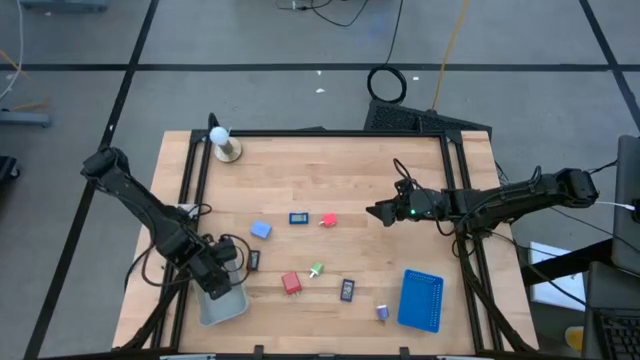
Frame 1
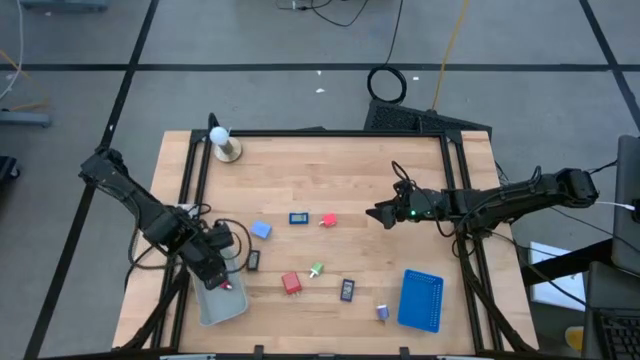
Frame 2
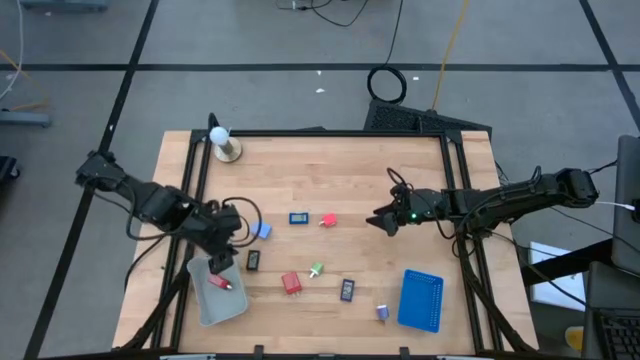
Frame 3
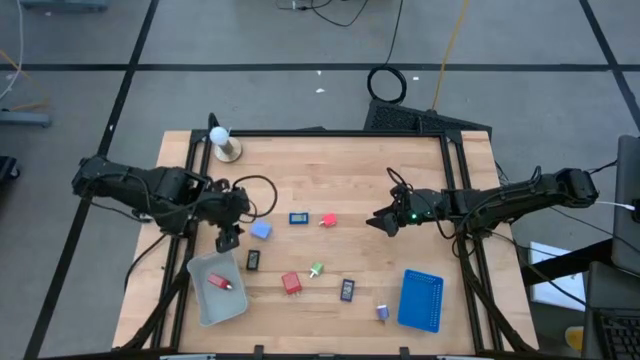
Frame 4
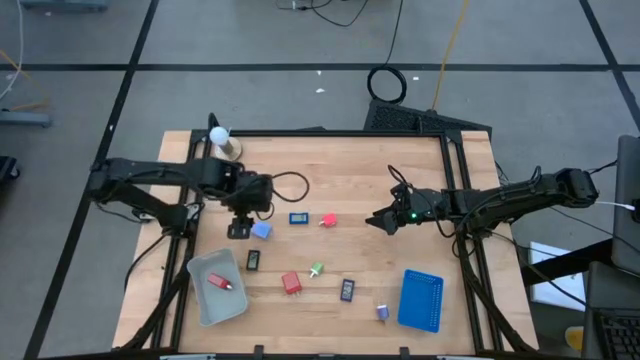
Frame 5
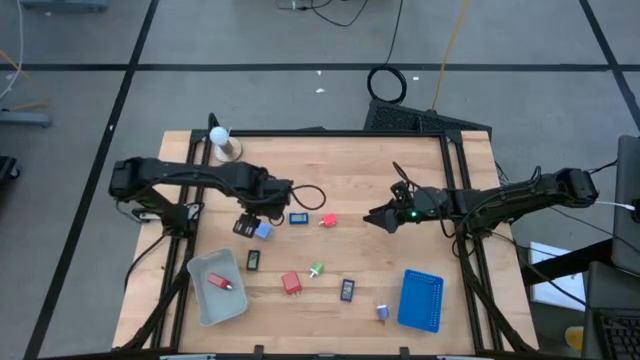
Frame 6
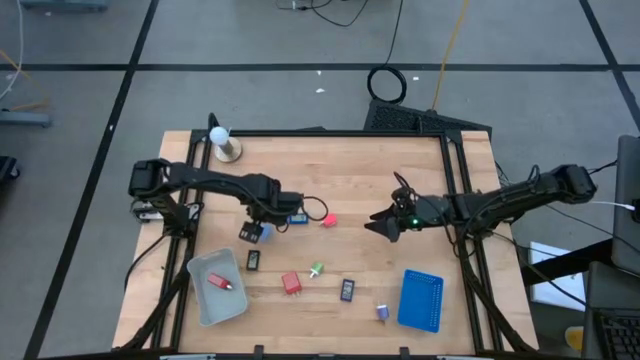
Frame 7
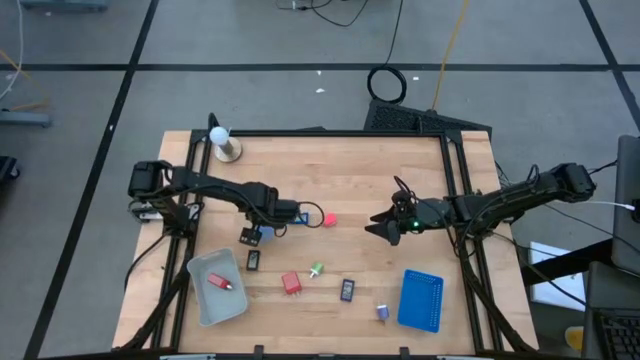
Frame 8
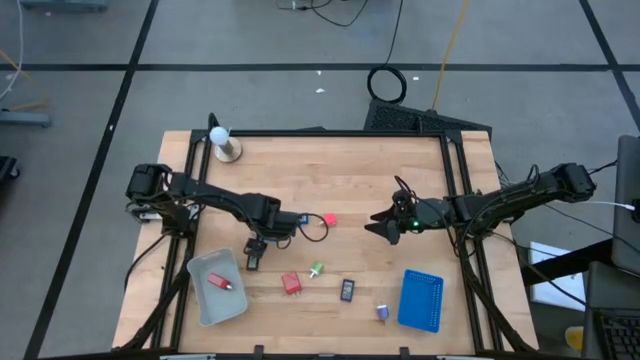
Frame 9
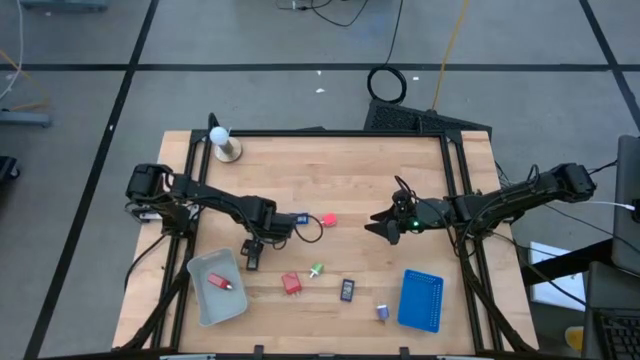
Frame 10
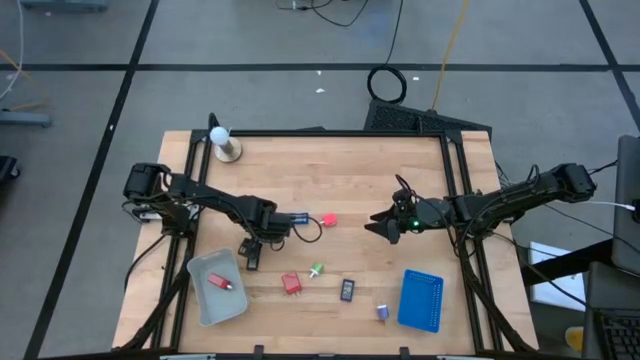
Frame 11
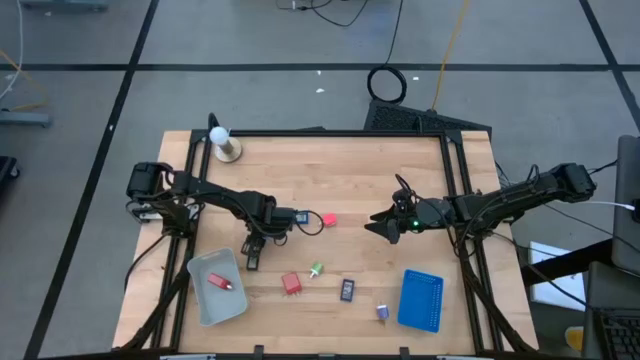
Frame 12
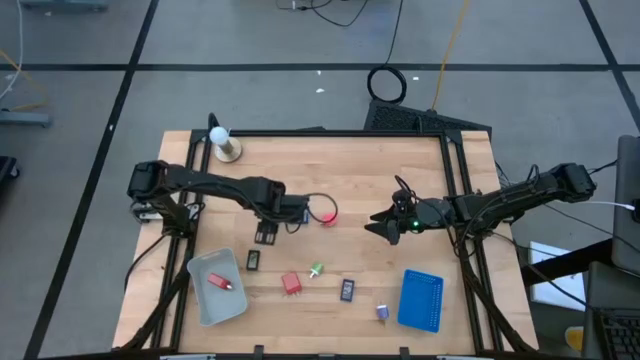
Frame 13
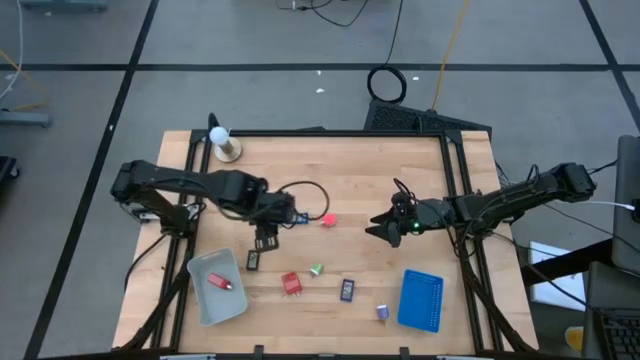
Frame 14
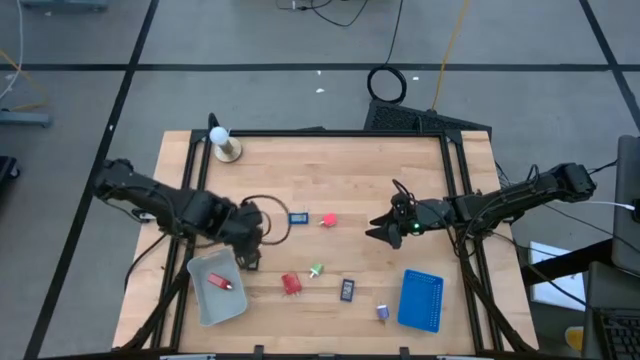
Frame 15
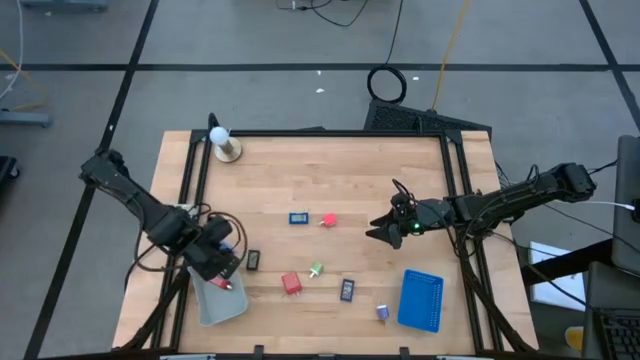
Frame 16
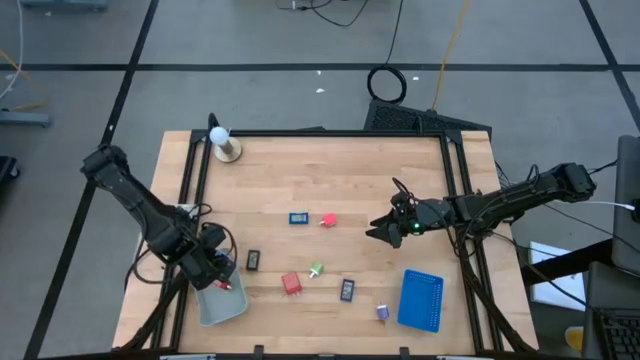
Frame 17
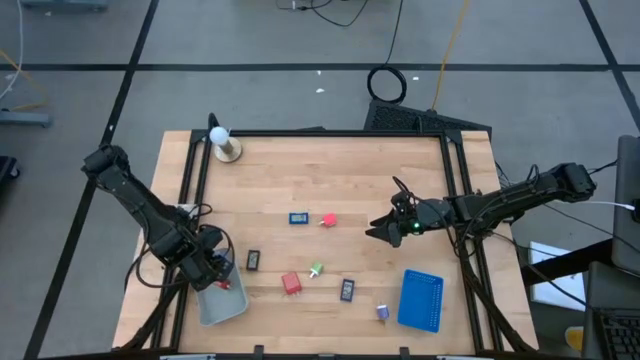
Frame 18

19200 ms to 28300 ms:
Task: Pick & Place Office items
Put the blue power adapter into the gray bin

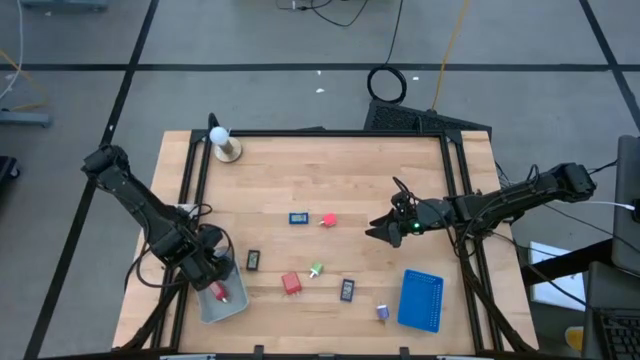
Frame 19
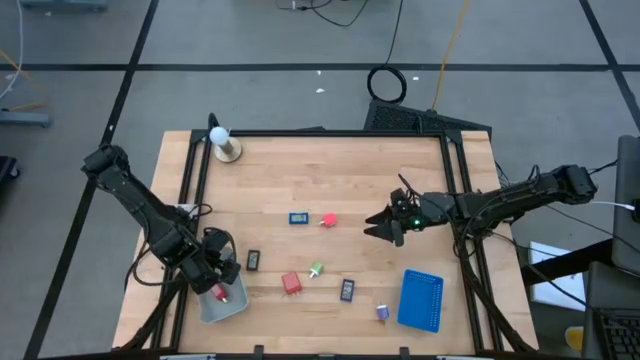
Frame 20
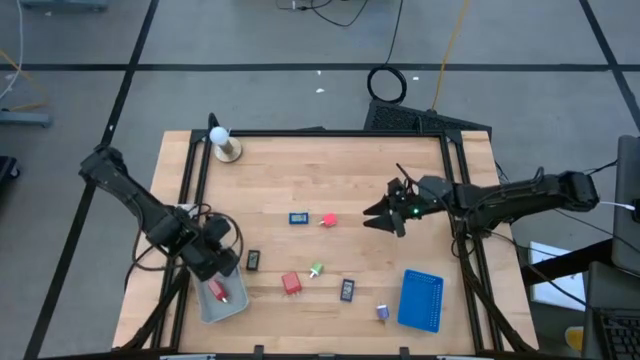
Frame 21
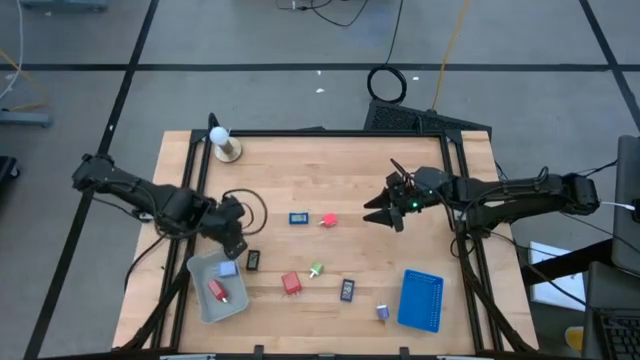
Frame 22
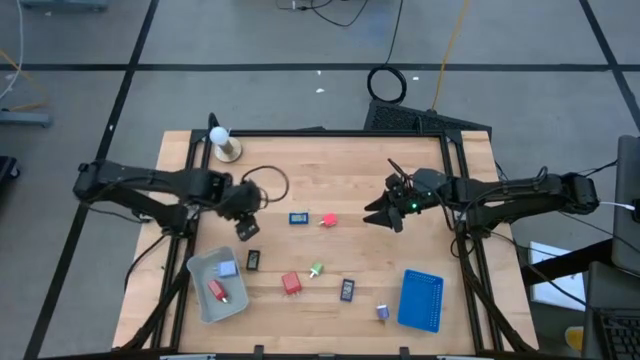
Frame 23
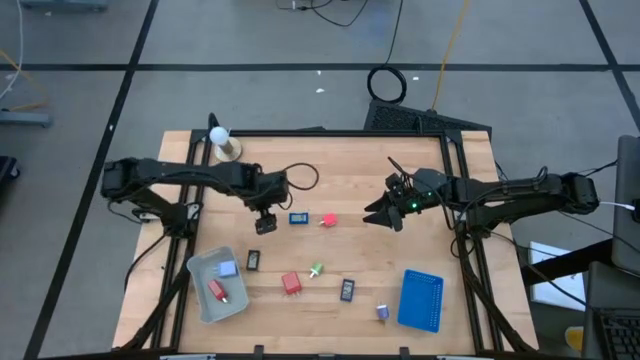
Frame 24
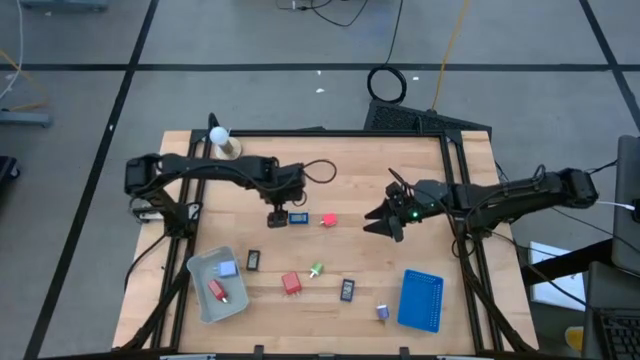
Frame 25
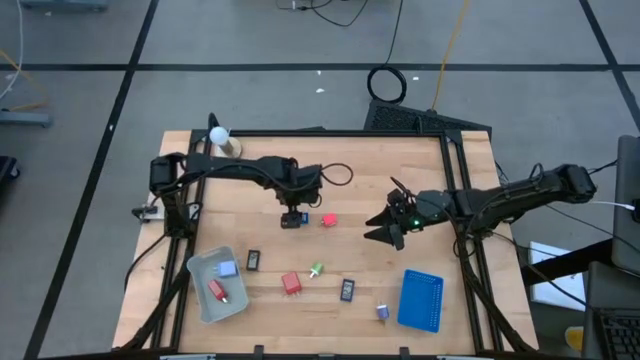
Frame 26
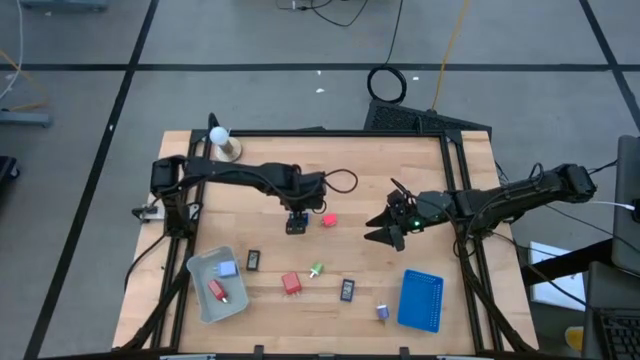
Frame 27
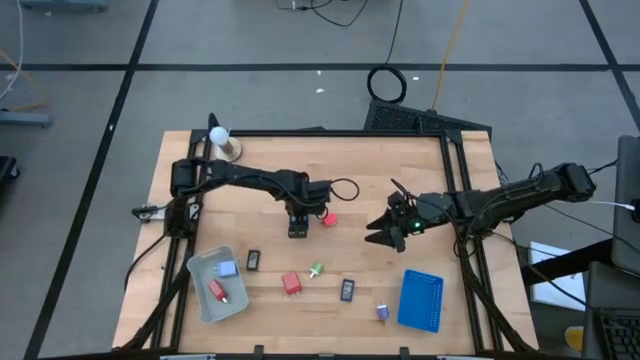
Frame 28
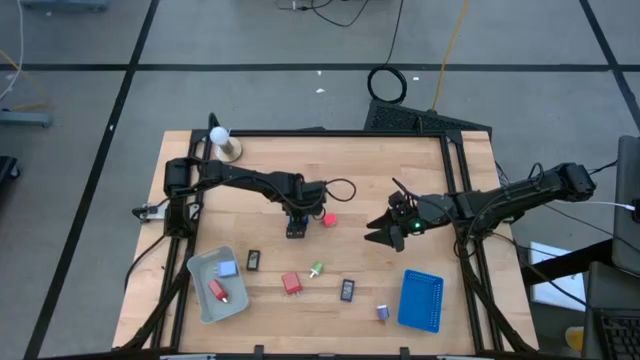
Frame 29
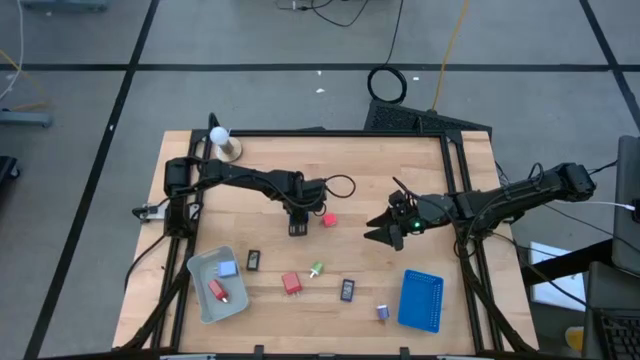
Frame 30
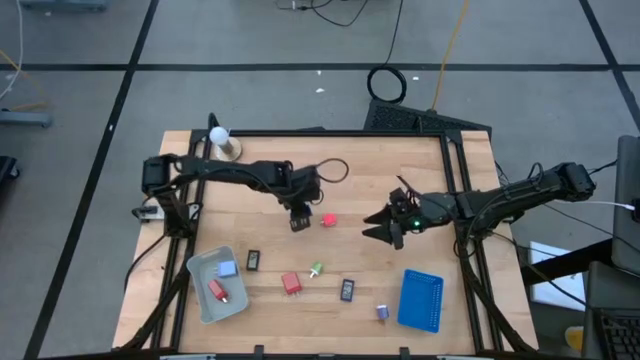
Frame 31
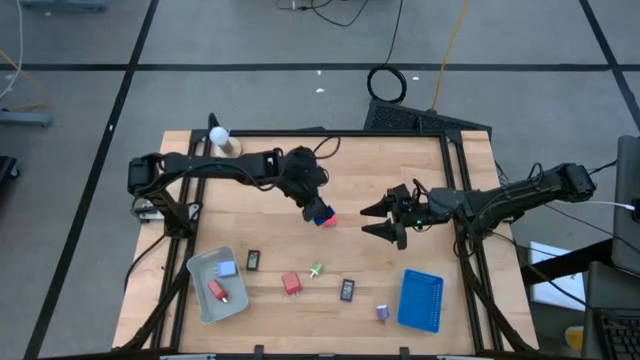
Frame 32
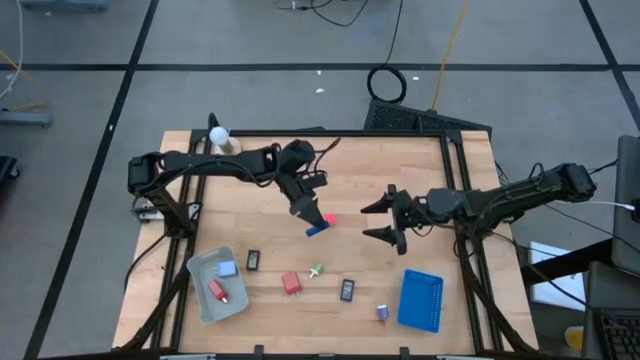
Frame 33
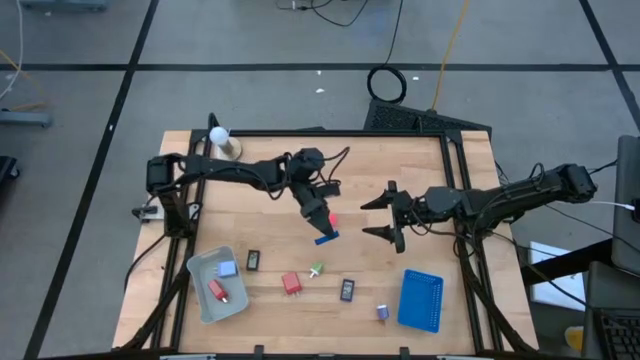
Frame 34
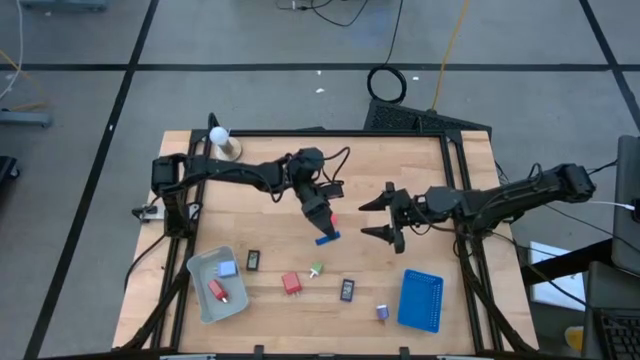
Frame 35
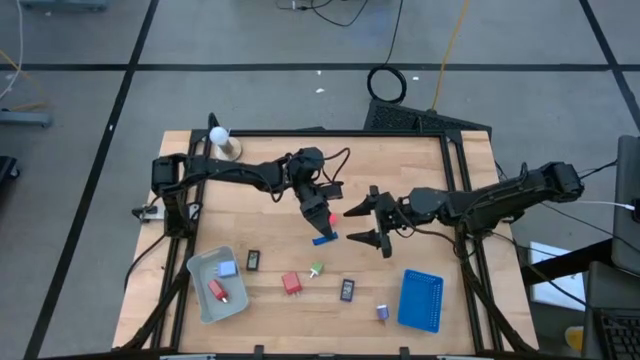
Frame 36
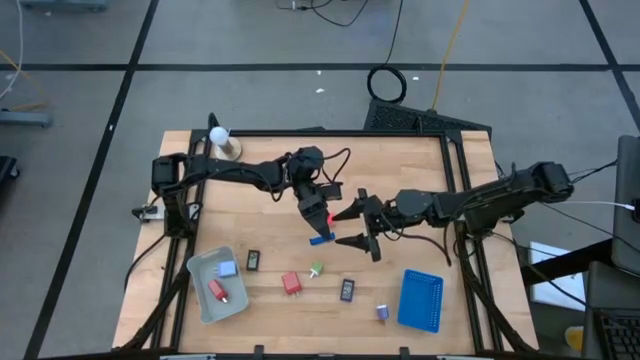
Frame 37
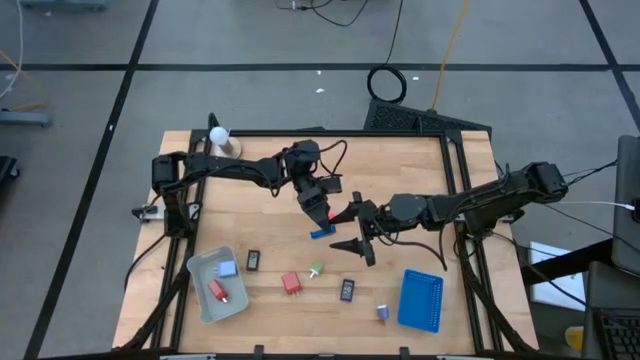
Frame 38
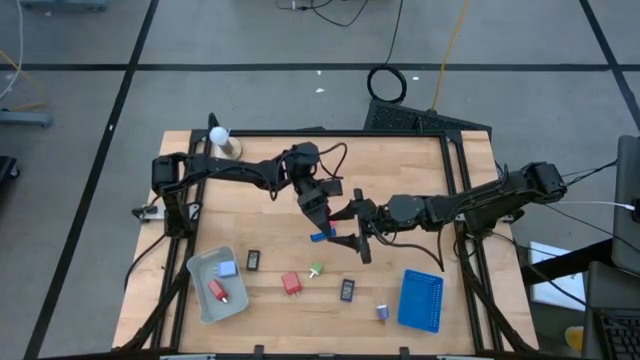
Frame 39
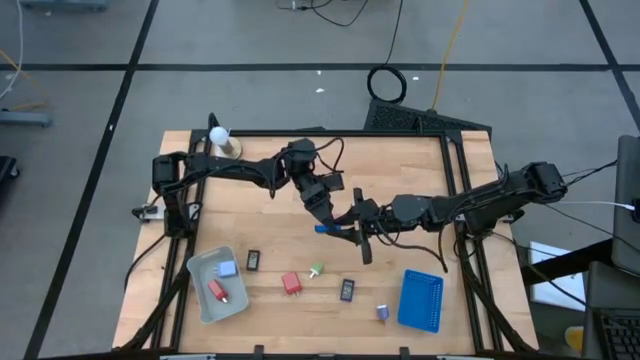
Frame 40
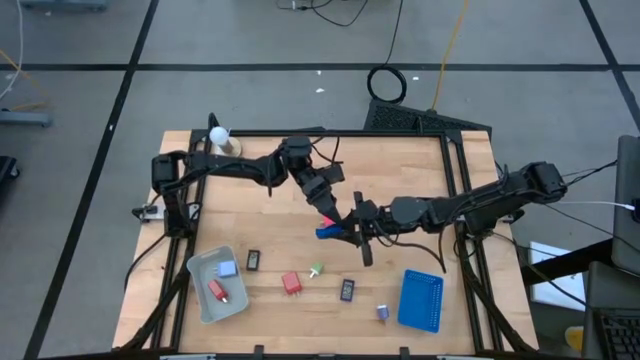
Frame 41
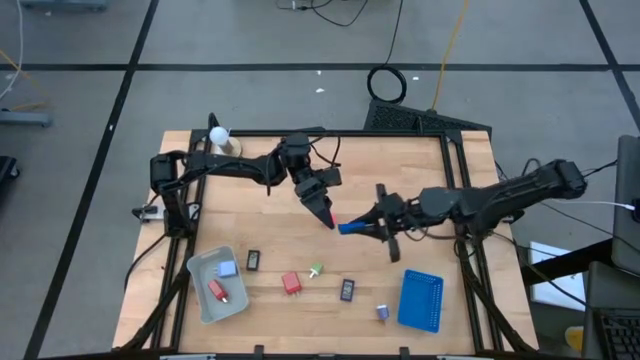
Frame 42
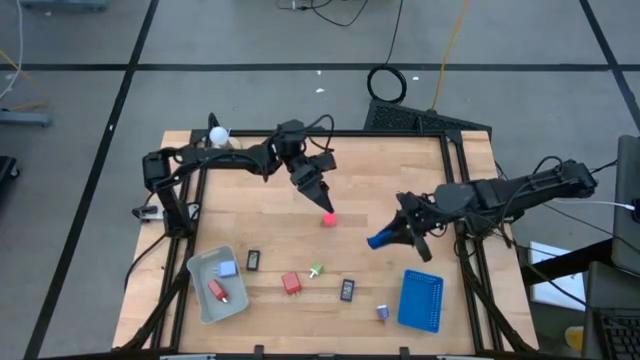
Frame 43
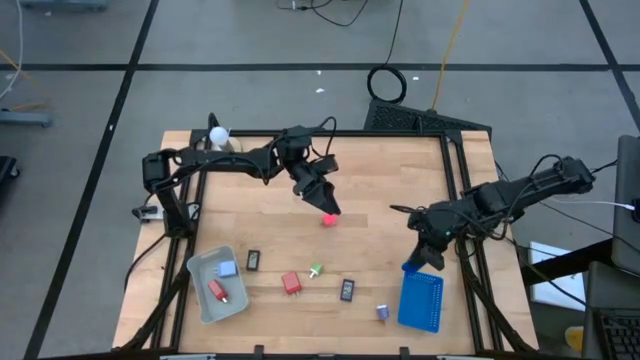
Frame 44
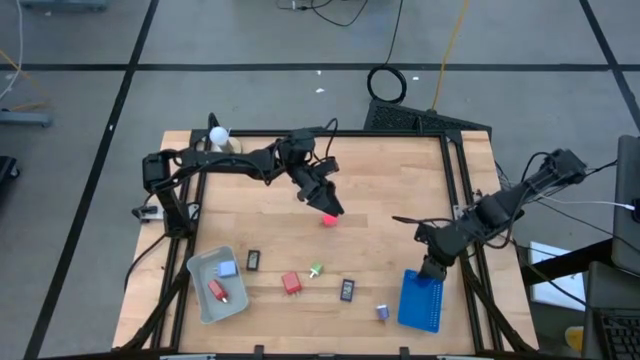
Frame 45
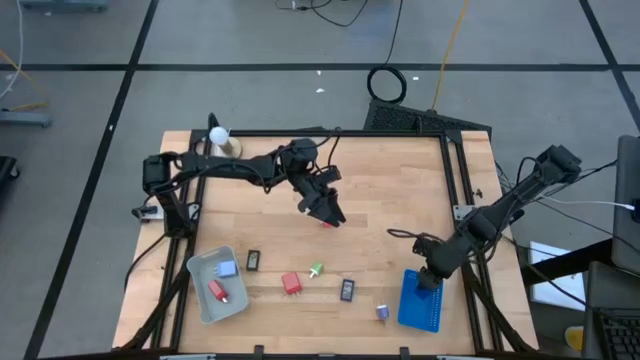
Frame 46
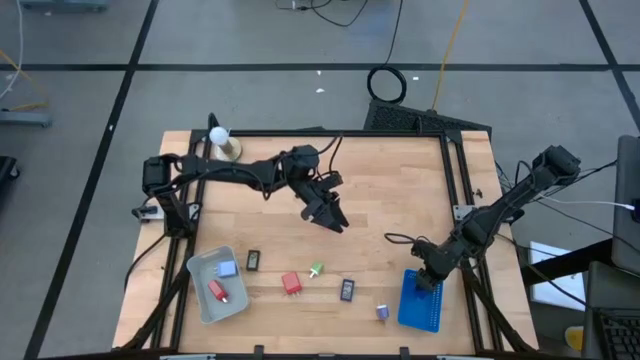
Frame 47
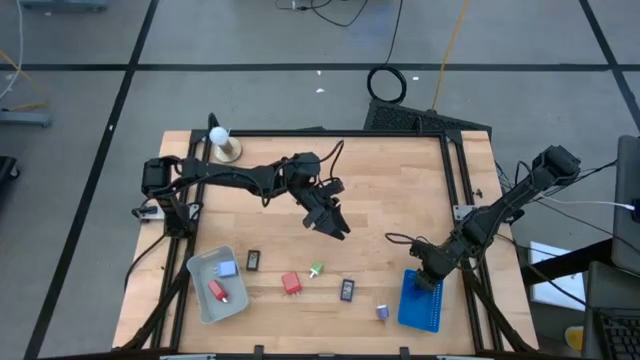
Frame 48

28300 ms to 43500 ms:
Put the top blue mini digital clock into the blue bin
